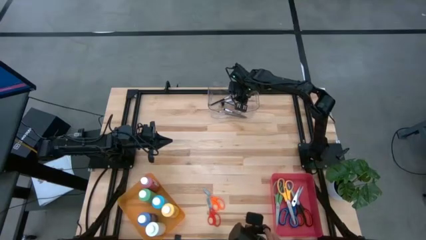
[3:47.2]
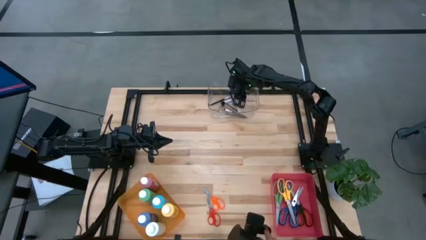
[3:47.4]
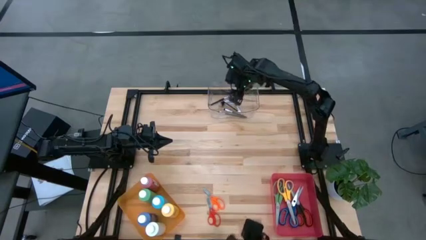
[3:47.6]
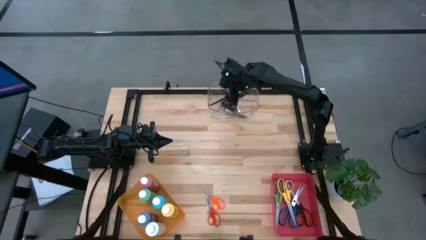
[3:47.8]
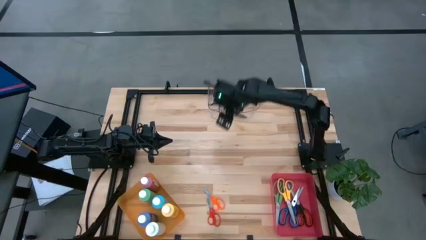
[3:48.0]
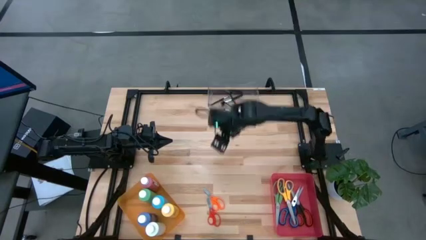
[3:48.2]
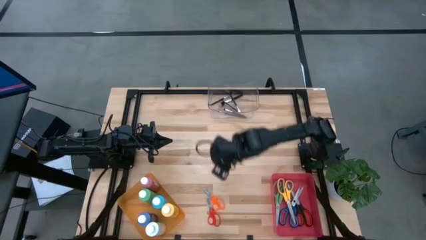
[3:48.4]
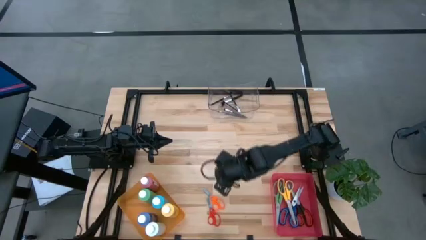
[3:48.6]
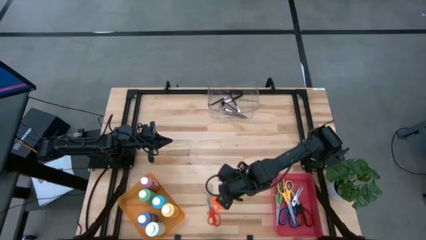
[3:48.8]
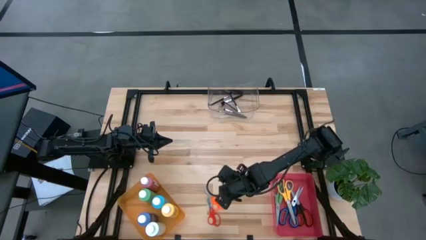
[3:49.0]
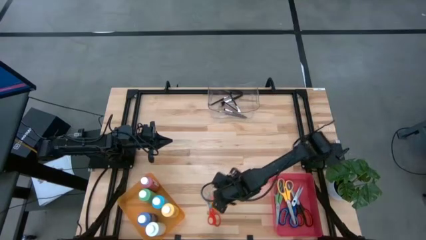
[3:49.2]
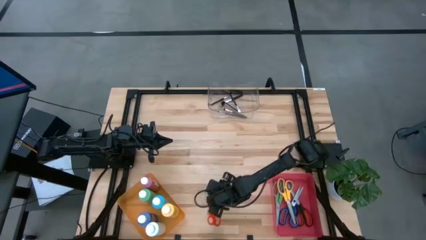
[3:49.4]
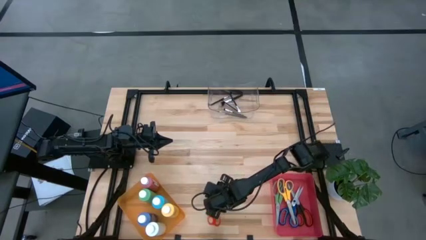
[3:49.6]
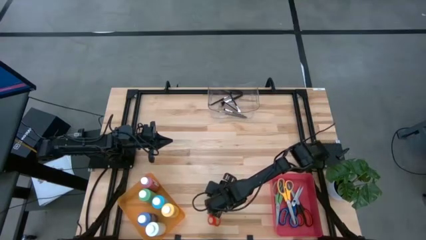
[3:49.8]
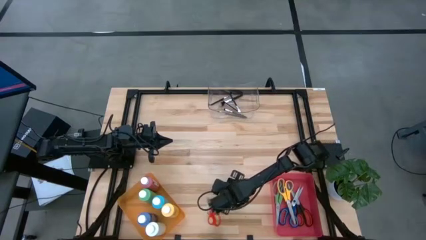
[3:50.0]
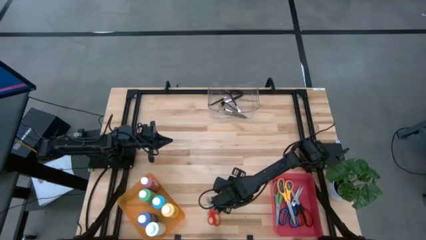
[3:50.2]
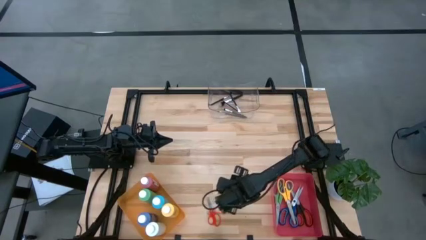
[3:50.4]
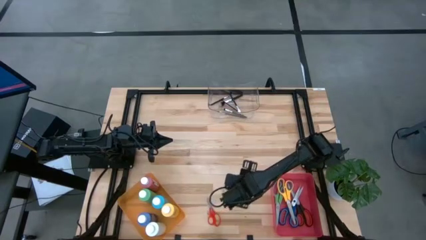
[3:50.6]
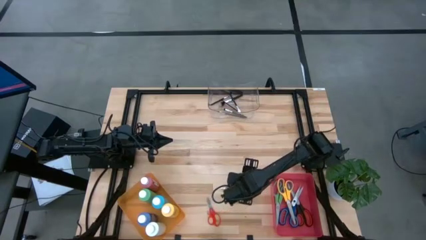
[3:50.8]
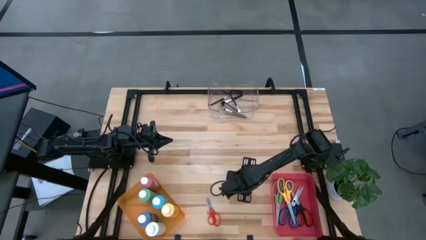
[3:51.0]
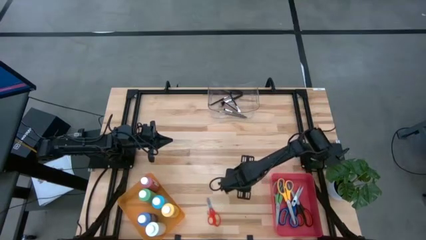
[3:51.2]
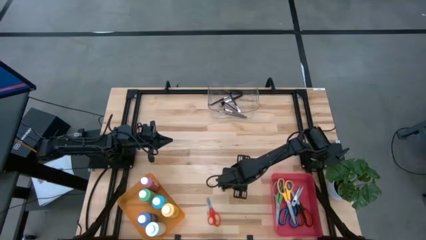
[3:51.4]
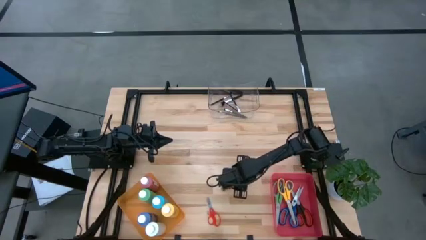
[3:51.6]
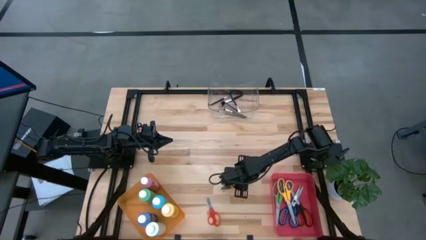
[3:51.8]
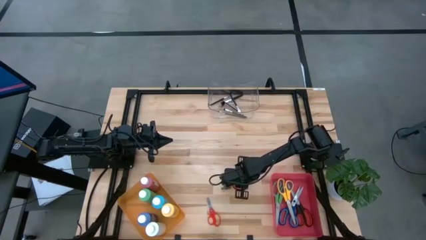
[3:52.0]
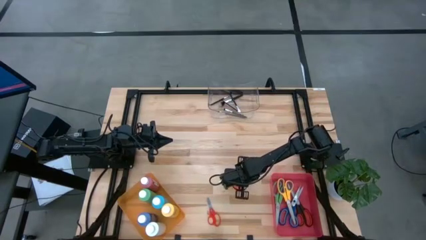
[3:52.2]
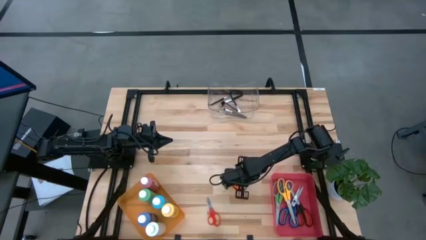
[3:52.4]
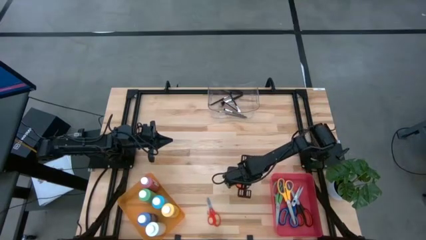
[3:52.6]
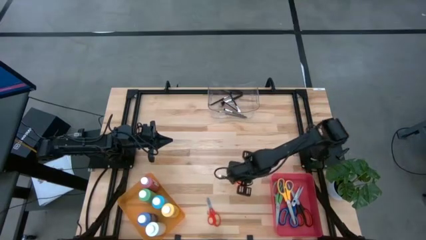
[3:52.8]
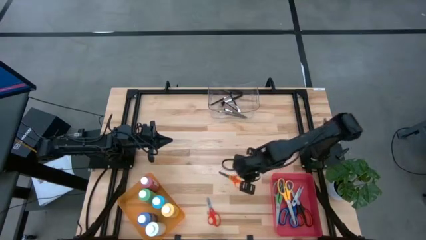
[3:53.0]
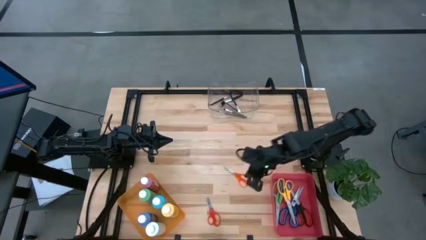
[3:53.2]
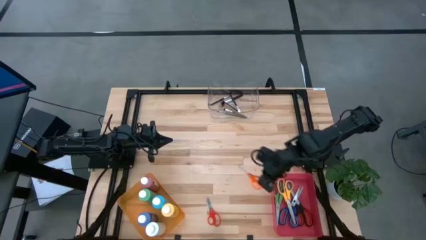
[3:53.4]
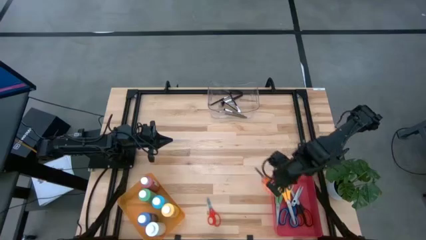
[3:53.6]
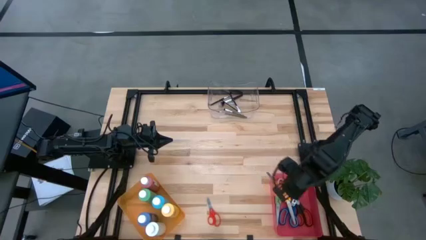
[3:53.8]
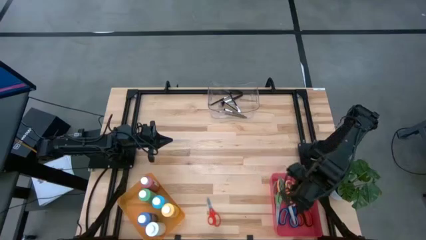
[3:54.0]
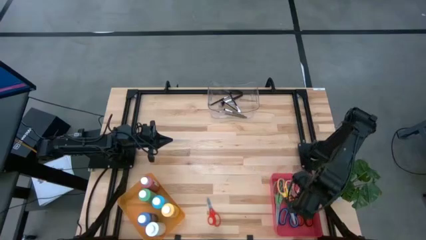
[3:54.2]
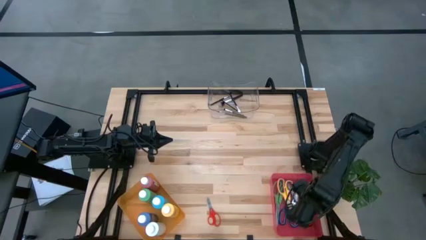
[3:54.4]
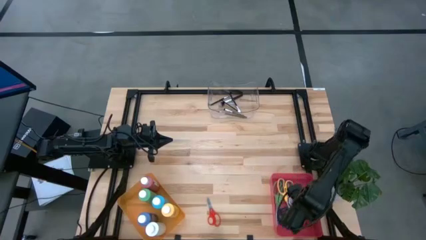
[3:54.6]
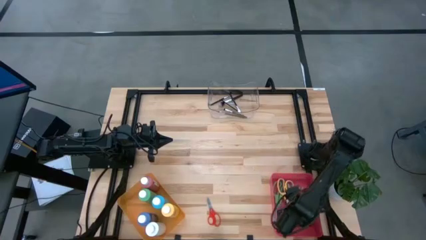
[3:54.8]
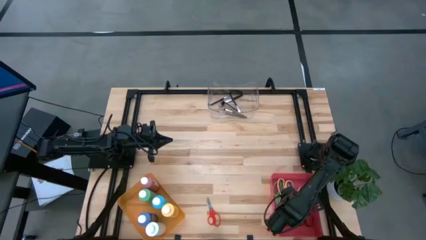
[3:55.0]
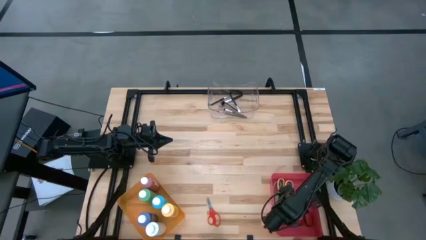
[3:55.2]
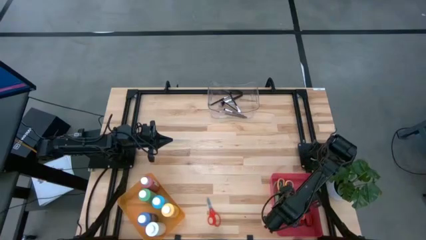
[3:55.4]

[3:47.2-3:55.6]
Task: Pick & Place Paint Supplies
Put the orange scissor into the red bin

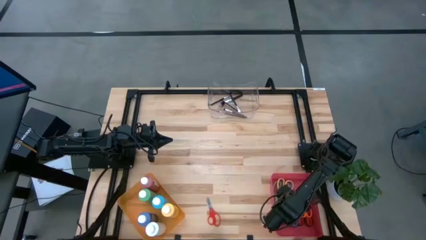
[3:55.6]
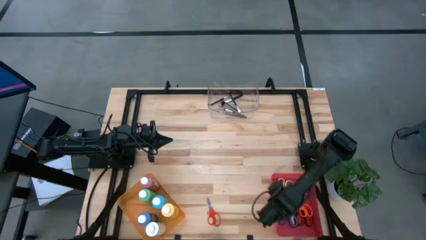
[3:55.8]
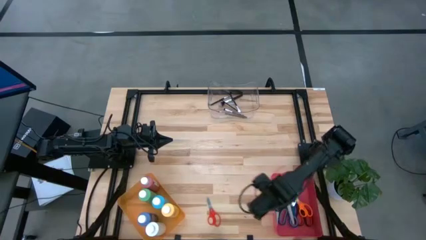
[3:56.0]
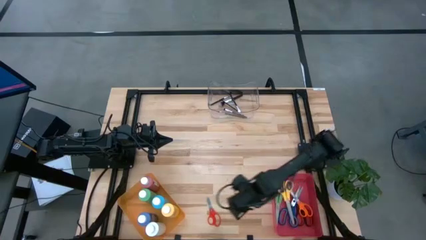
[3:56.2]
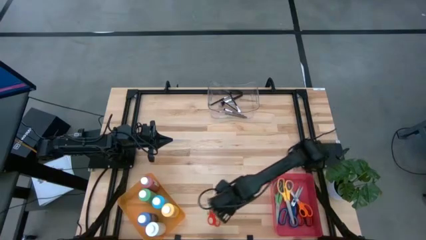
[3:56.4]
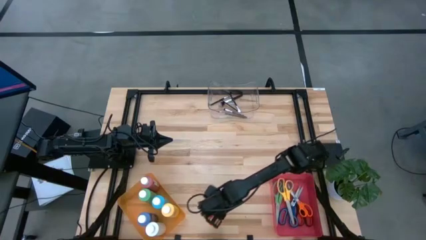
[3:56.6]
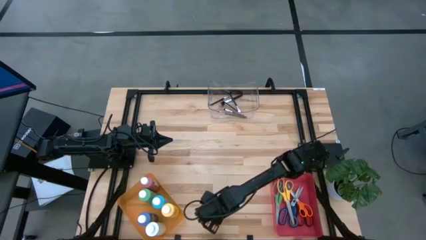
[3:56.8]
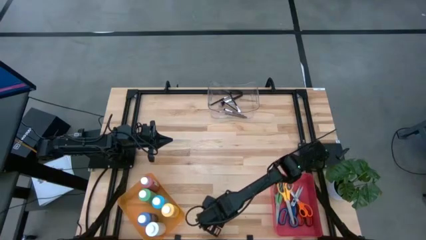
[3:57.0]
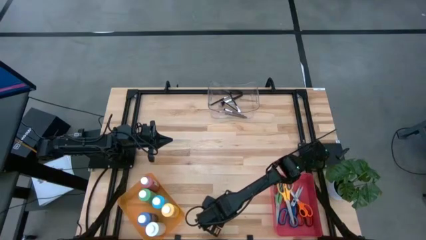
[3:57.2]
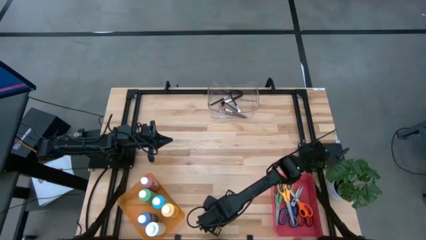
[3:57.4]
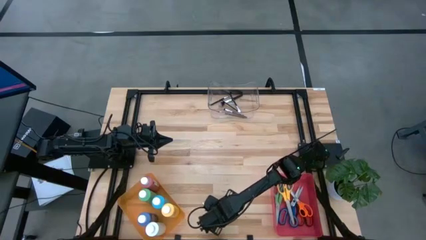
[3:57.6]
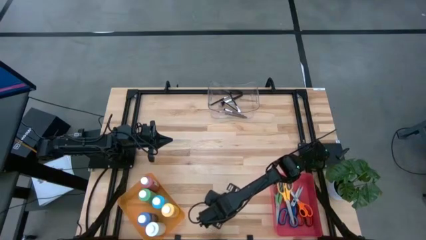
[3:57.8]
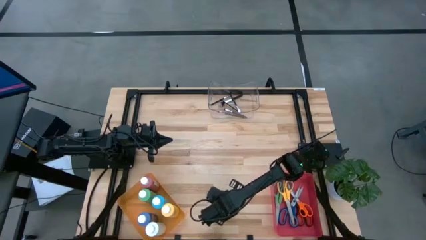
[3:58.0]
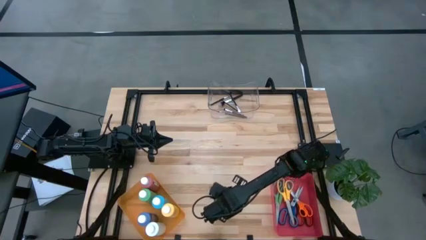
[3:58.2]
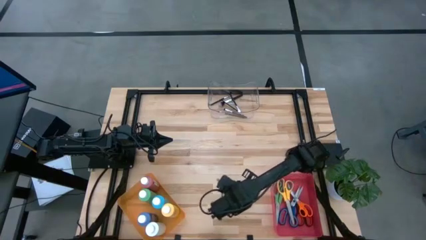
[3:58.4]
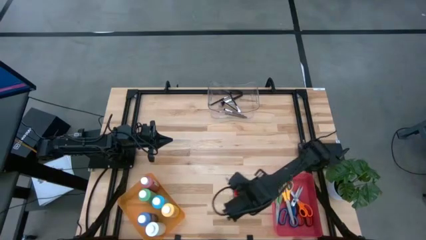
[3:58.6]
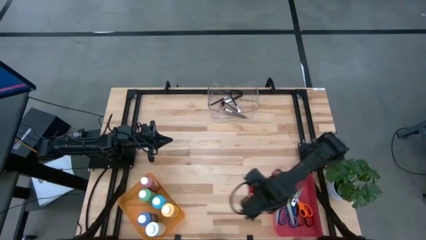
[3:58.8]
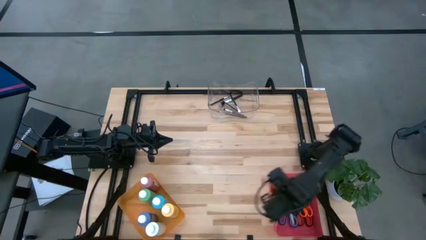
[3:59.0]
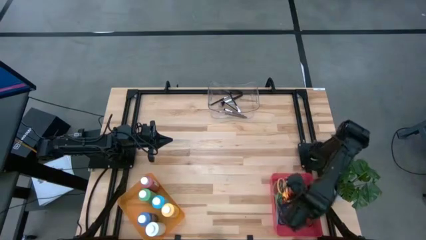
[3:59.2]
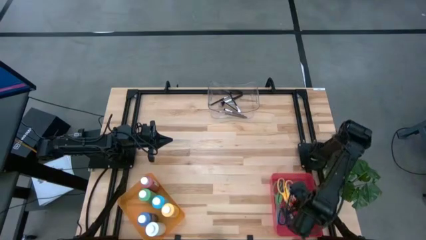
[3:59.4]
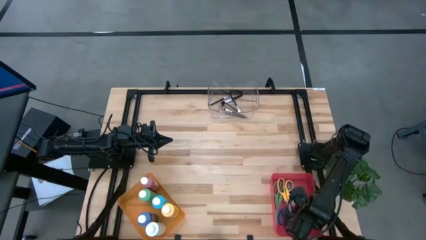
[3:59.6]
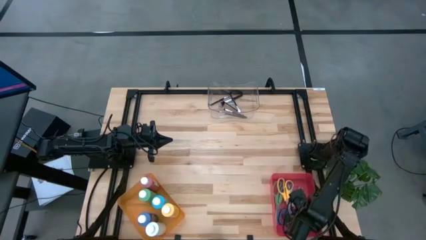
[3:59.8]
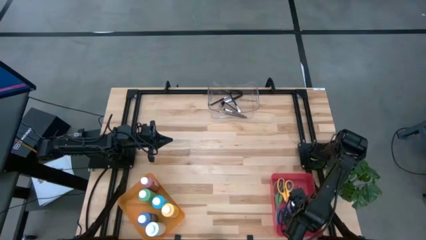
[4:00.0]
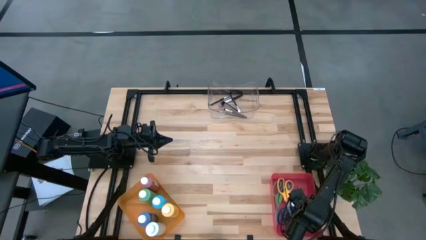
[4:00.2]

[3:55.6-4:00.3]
Put the red scissor into the red bin

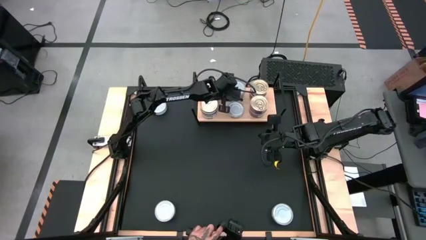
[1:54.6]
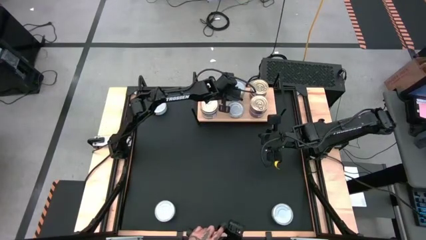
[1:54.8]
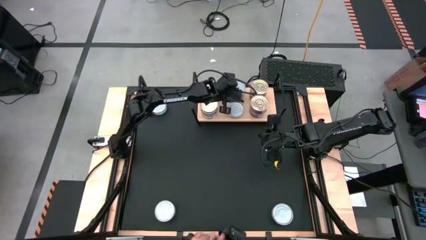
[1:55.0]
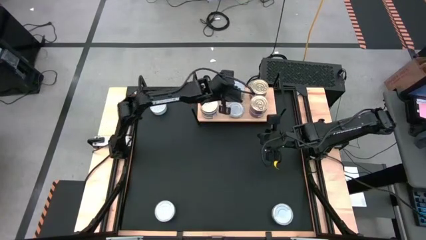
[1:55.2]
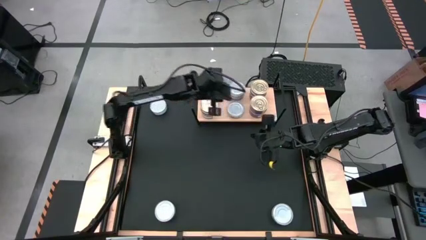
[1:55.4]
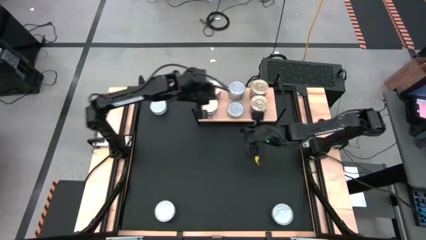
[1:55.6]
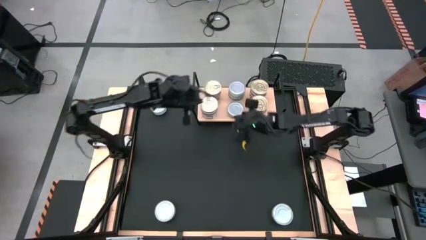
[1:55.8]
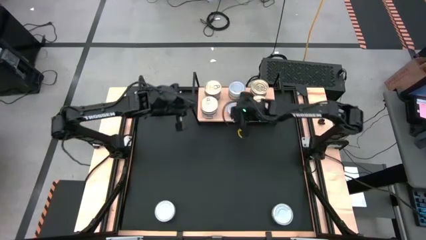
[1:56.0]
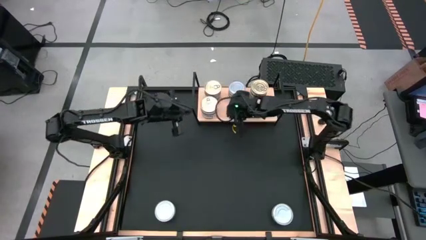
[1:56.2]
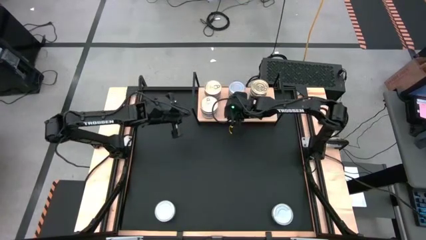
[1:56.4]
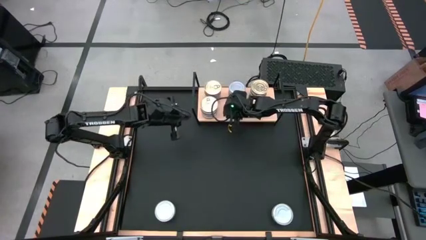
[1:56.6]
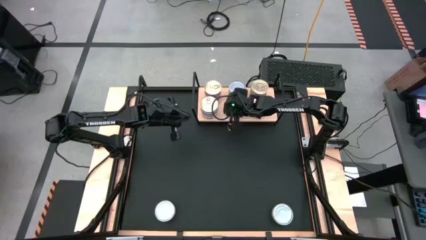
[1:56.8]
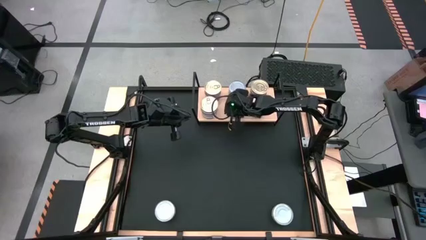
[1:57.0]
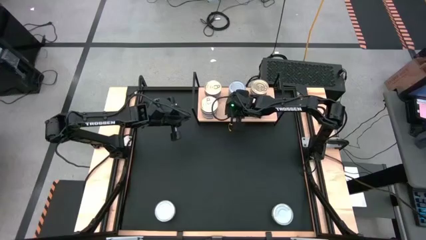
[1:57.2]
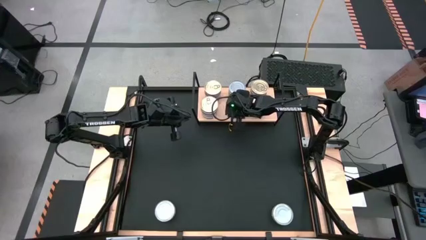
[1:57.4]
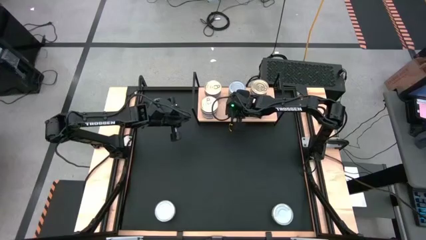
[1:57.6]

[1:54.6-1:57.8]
Task: Stack canned seafood by type on shelf
Adjust the green tuna can on the shelf

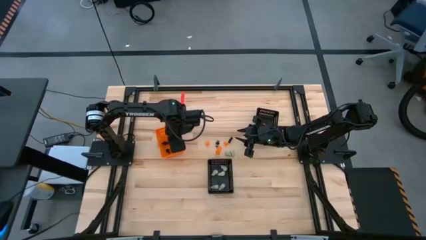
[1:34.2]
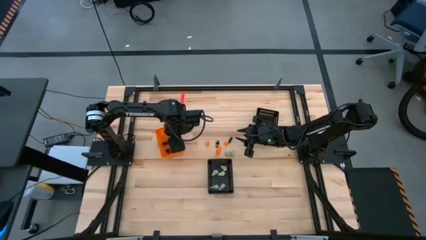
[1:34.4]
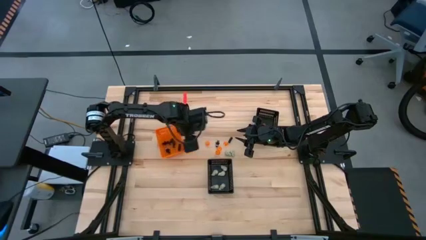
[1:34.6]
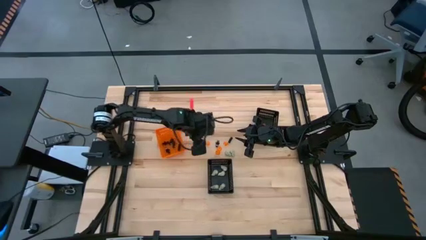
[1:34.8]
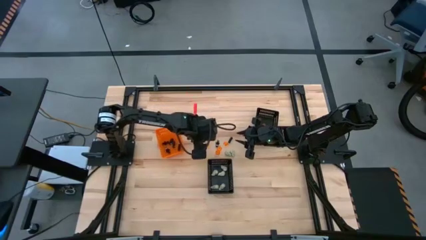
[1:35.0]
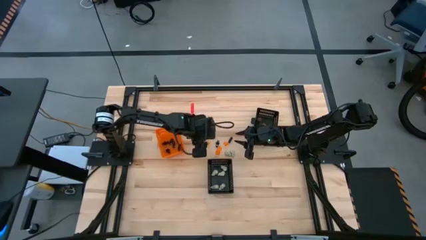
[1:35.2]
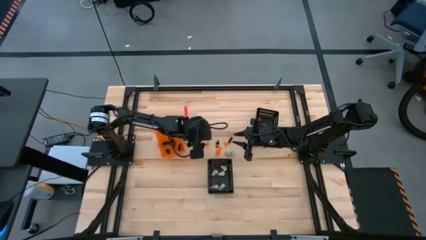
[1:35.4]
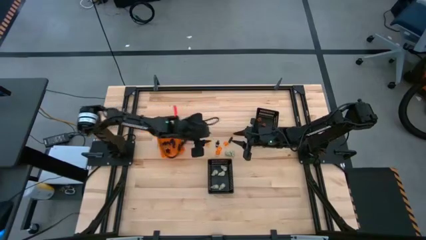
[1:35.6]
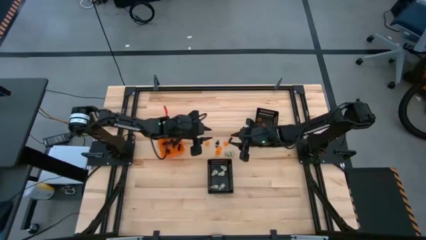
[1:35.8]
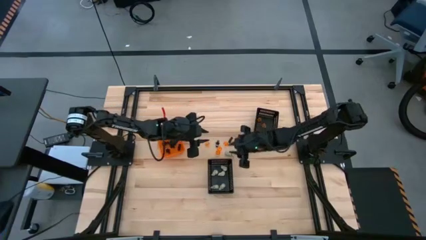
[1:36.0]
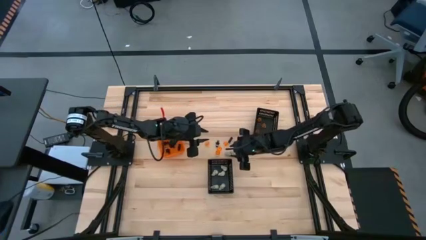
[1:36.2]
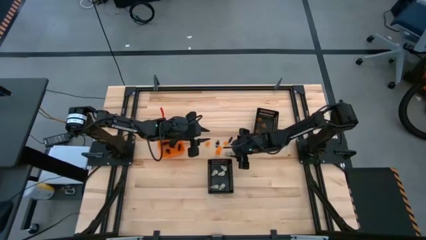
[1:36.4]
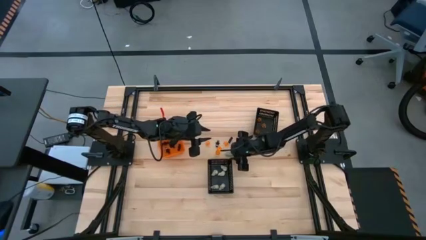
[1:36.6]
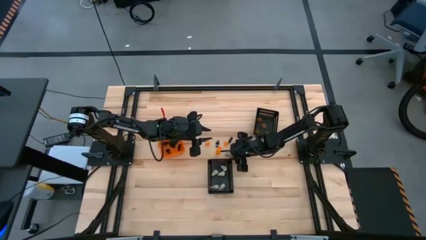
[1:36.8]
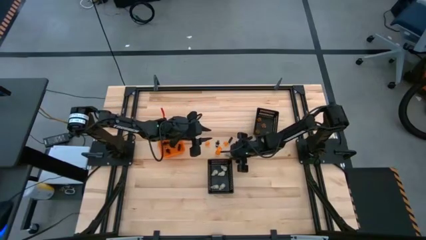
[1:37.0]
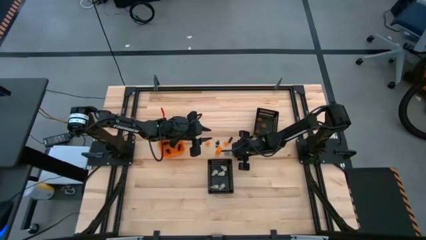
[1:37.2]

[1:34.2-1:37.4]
Task: Sort Halloween decoration
Put the white skull toy into the bottom black bin
